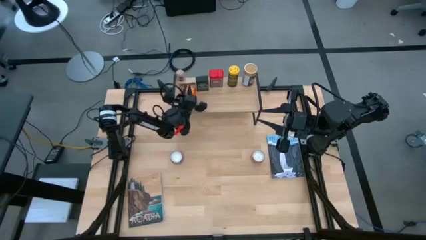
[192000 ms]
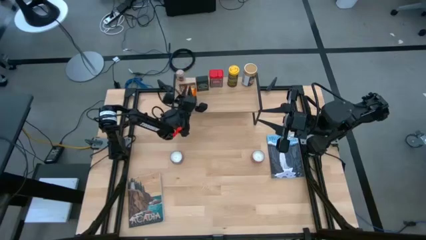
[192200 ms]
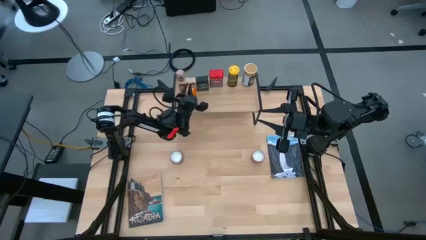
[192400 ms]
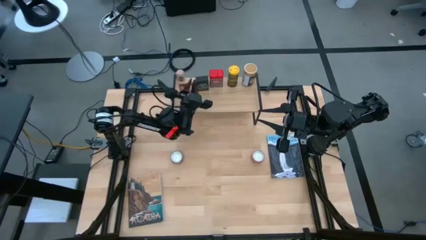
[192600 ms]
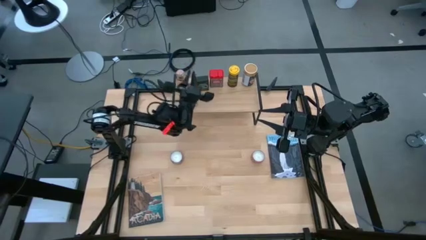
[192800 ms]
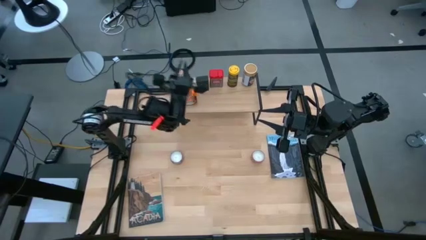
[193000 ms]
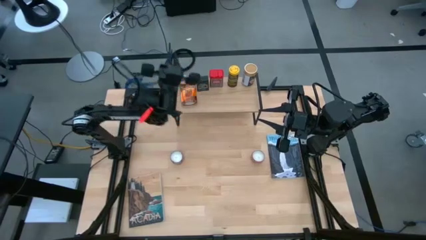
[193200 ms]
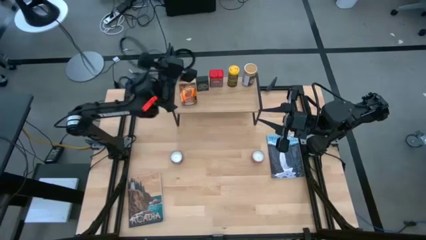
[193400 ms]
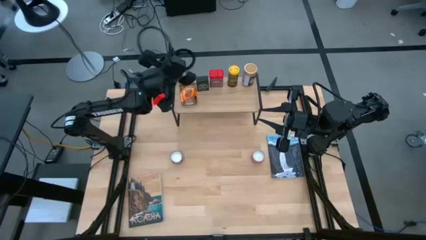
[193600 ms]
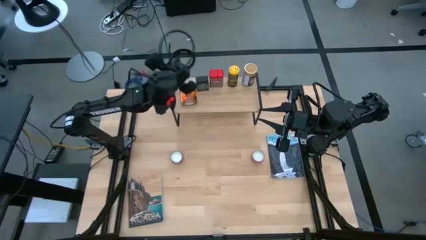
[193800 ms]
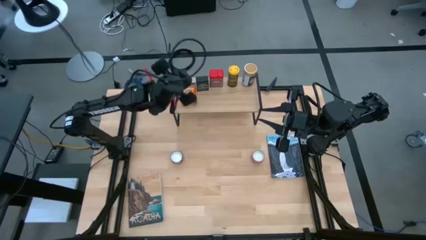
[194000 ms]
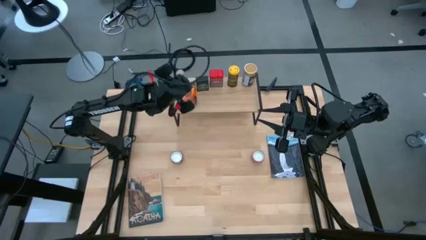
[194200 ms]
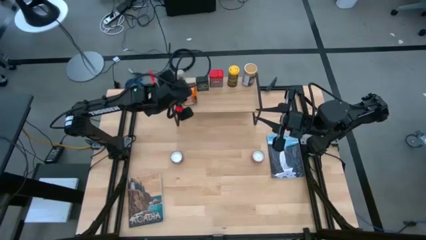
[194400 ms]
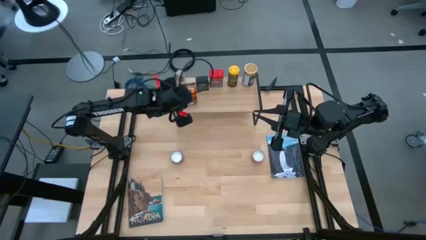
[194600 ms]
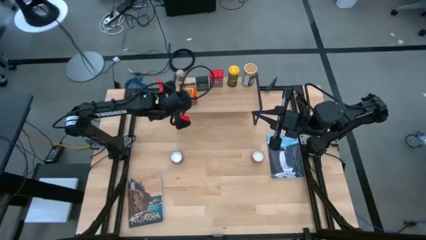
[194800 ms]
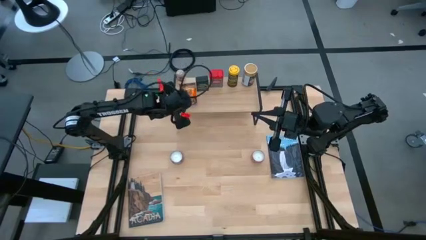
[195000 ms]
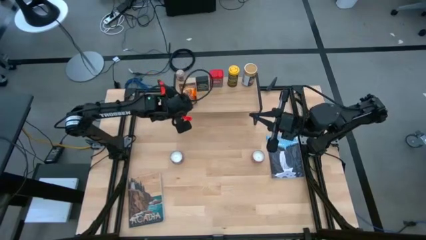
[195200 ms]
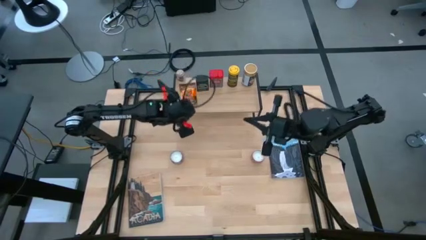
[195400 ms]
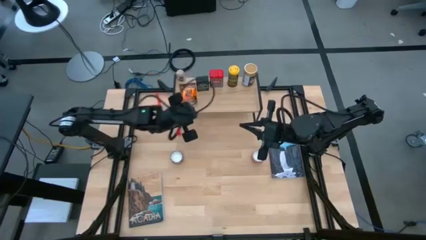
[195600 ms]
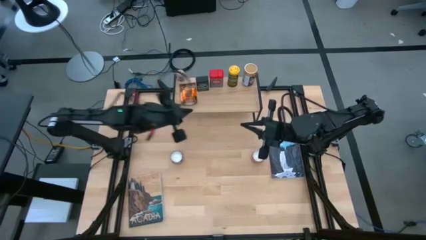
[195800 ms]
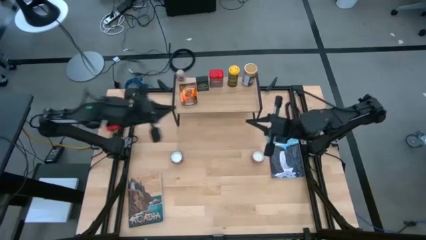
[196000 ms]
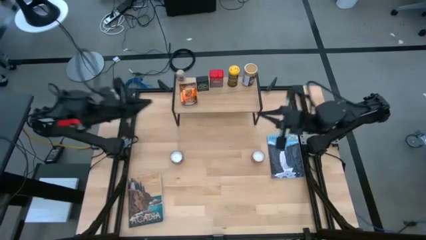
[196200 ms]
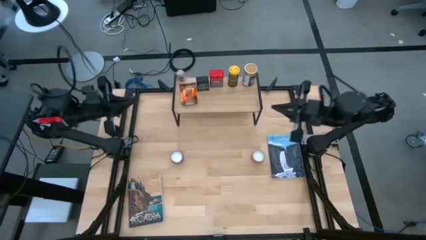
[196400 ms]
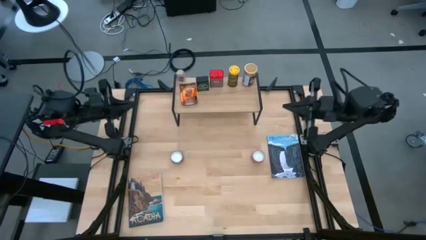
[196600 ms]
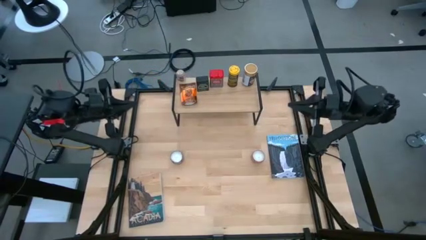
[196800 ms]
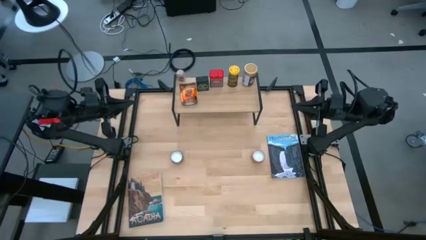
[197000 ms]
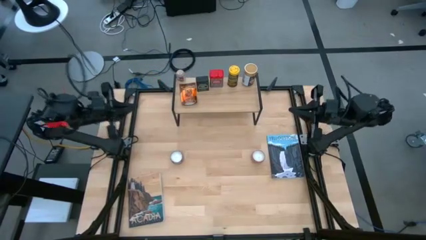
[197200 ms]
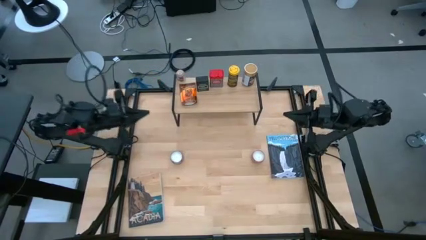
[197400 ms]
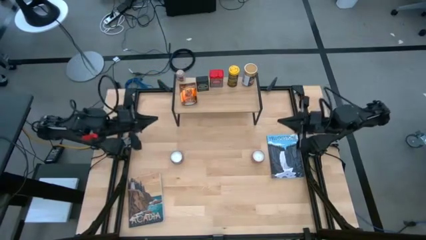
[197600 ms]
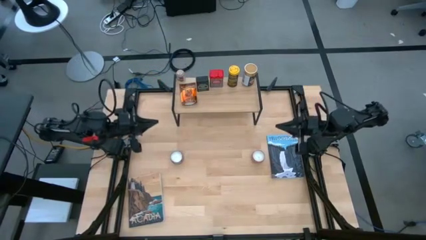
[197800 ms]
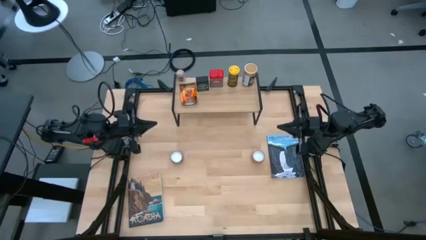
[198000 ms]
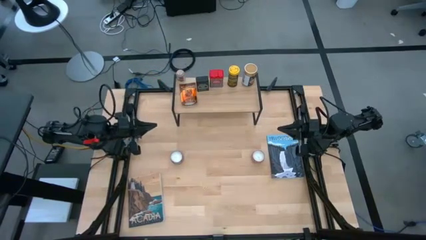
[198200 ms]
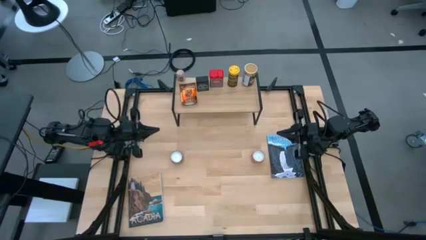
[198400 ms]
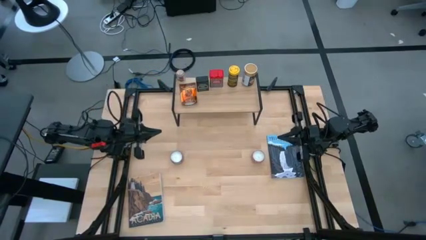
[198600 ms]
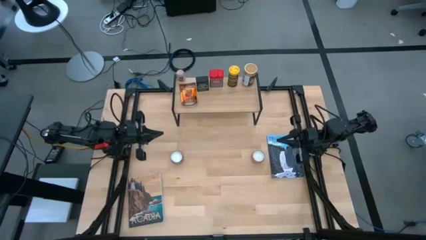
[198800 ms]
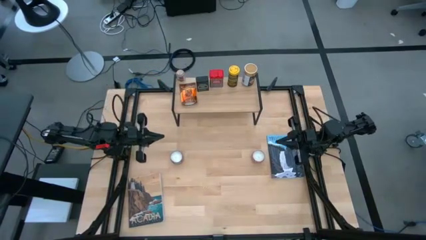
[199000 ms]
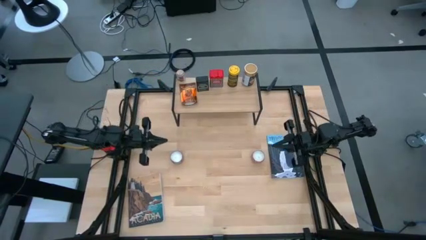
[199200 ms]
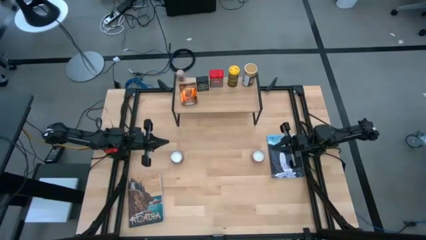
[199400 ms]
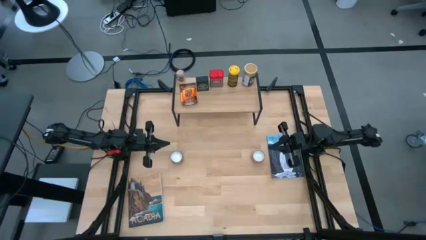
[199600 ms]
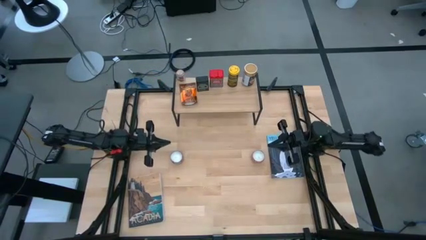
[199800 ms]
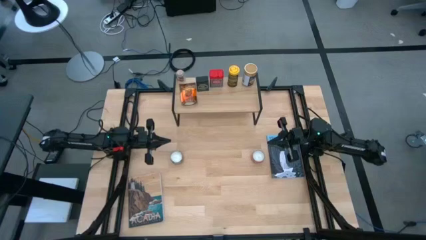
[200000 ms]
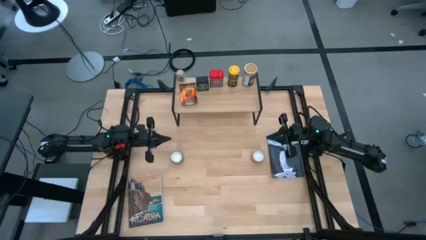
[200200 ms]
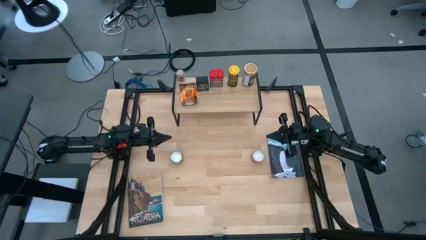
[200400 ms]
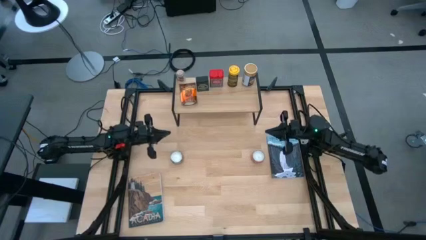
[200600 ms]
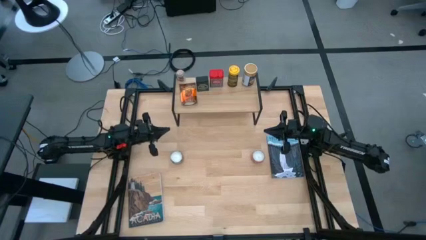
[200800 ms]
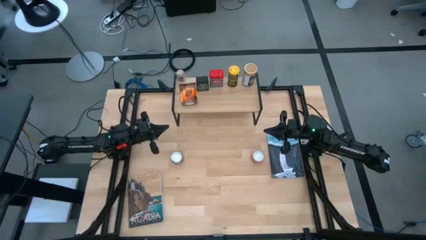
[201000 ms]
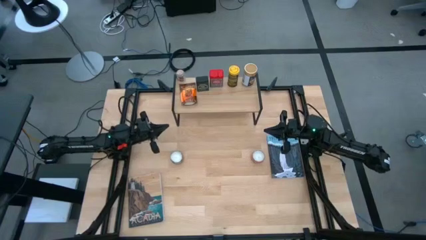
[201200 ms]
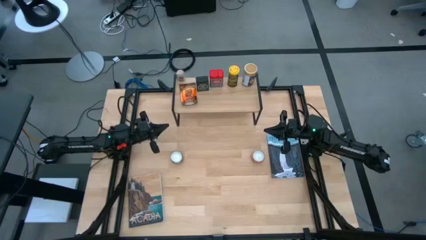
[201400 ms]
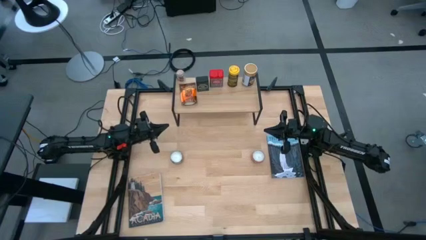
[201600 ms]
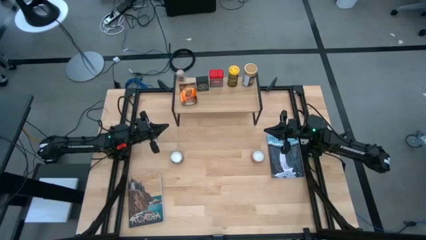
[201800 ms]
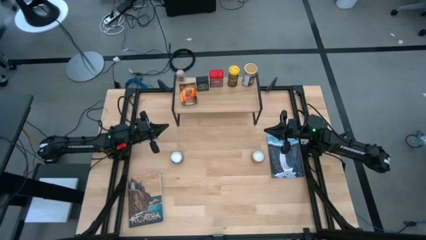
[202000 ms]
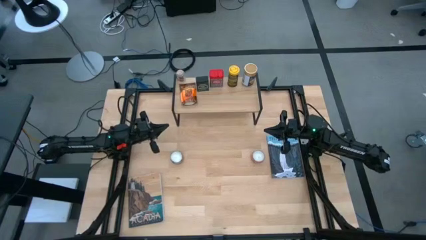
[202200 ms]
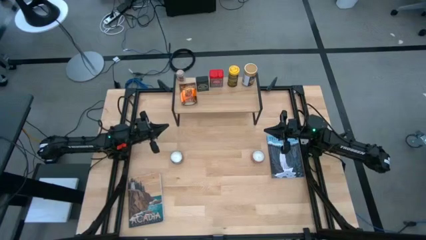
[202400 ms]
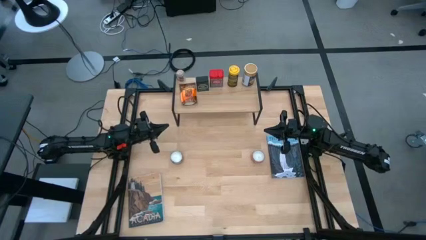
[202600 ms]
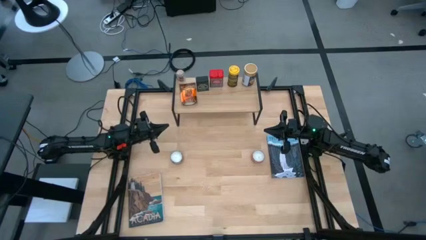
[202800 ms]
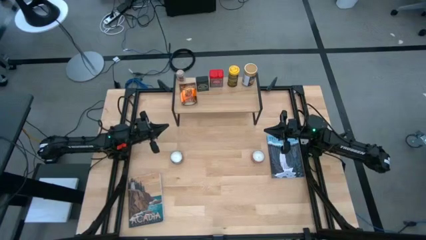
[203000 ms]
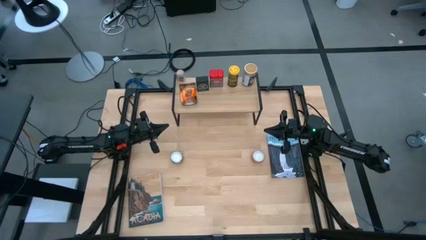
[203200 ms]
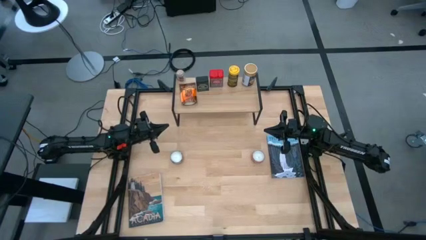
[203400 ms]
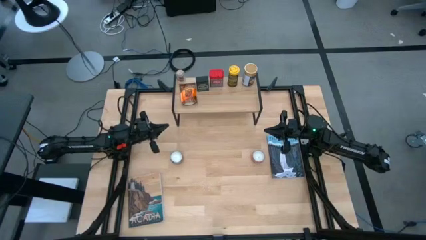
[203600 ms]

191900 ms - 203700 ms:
Task: Shelf spices
Return to Home Position

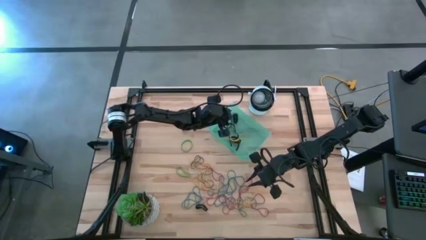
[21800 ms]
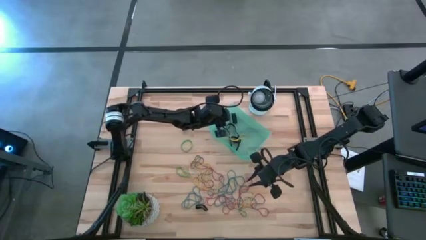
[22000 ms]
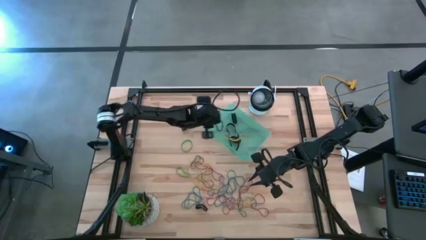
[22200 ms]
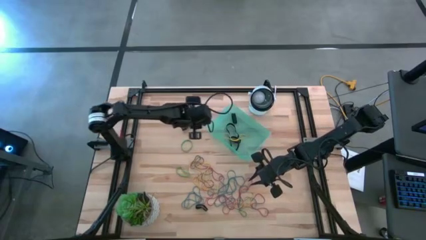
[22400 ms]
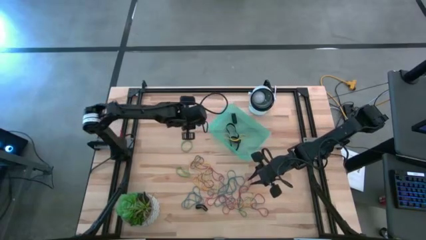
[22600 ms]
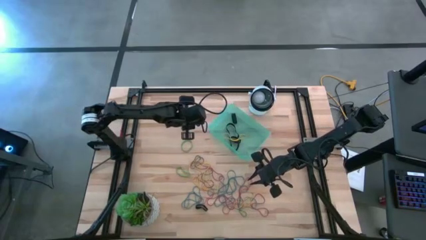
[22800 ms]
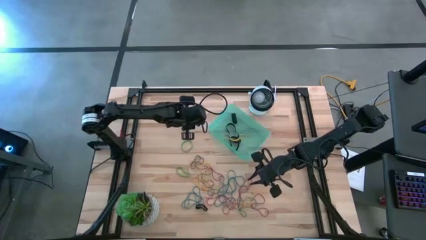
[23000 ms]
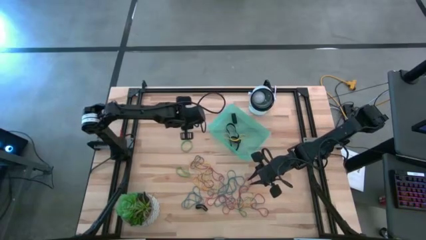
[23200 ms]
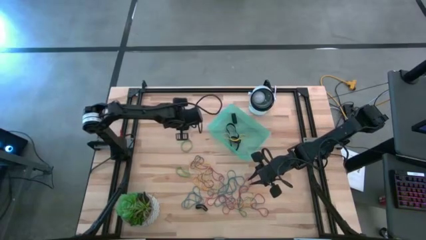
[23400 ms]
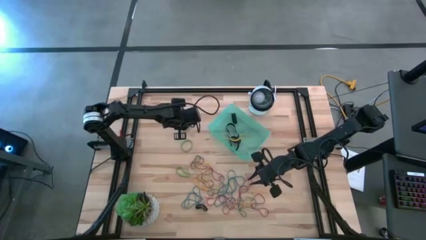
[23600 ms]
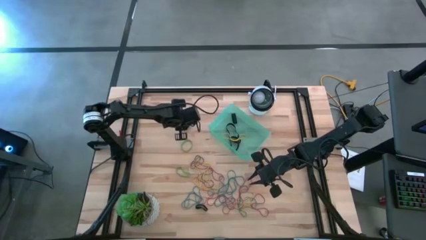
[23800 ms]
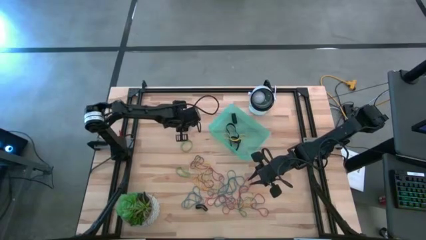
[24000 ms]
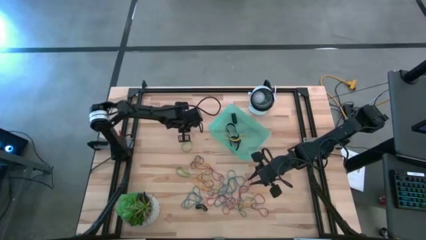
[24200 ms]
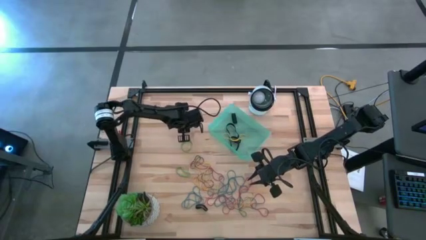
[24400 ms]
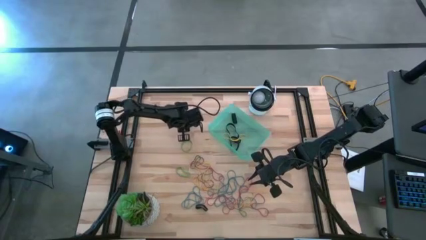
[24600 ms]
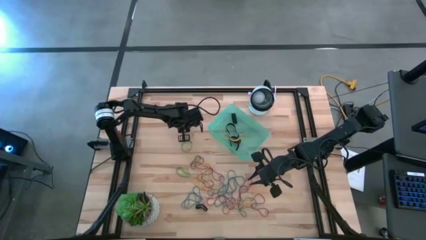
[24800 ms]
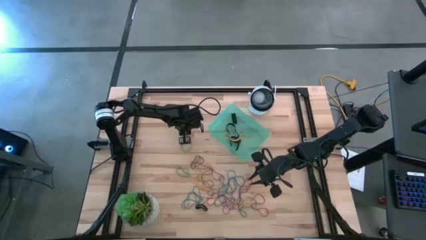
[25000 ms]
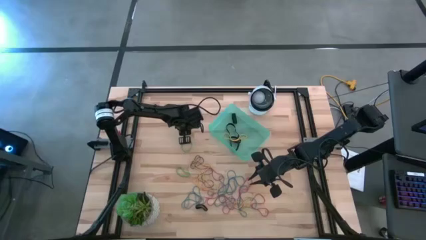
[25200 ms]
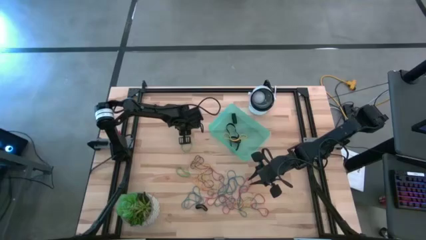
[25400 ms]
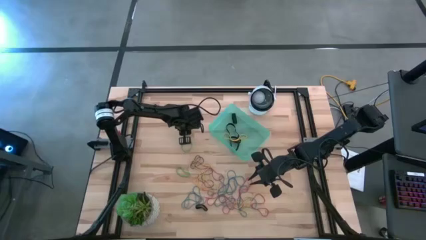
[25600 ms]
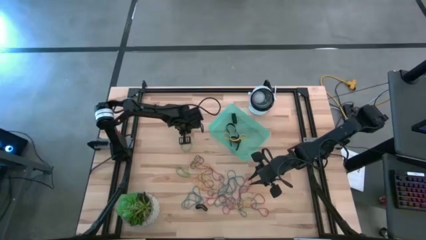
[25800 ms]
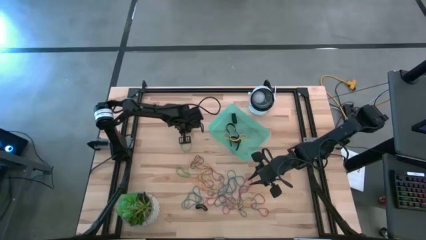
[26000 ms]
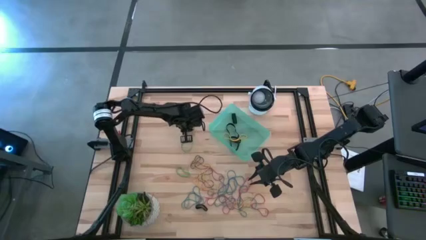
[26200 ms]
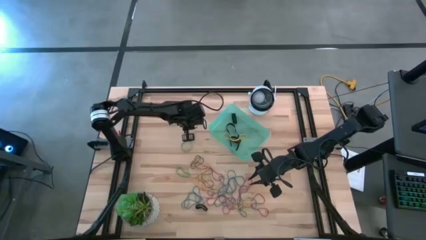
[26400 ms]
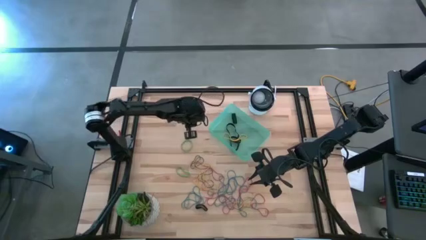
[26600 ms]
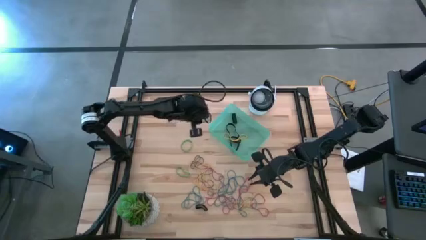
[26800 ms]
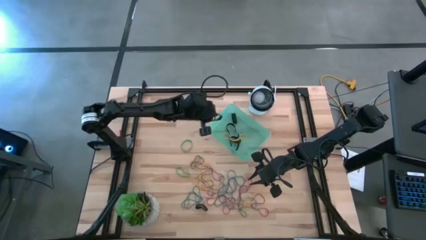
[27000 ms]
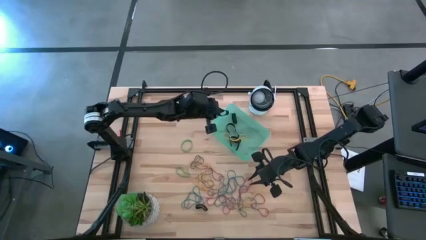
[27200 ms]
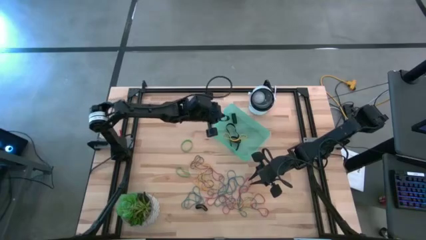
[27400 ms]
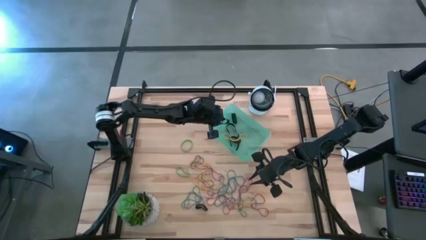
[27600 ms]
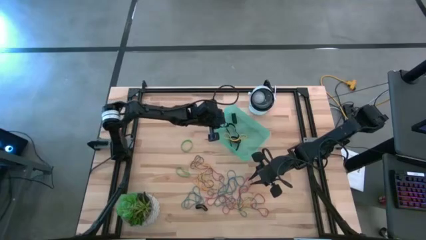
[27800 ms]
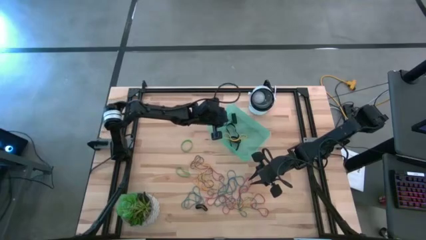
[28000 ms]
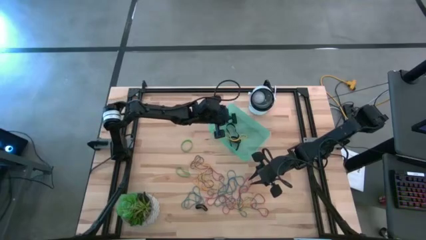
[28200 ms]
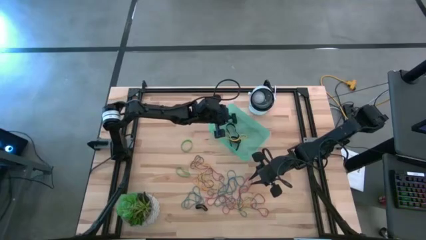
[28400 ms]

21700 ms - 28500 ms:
Task: Pick and place rubber bands into bin
Put the black rubber band into the blue bin
